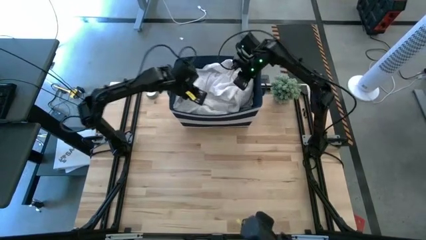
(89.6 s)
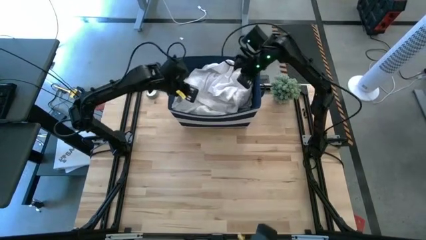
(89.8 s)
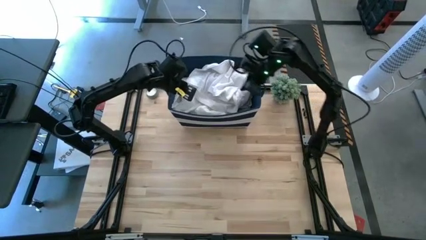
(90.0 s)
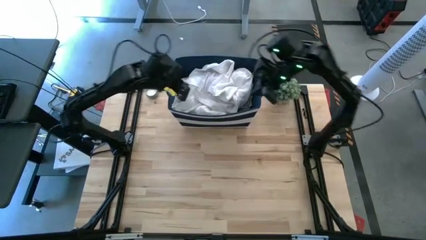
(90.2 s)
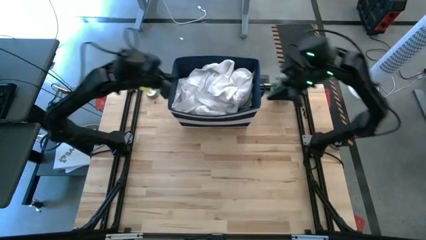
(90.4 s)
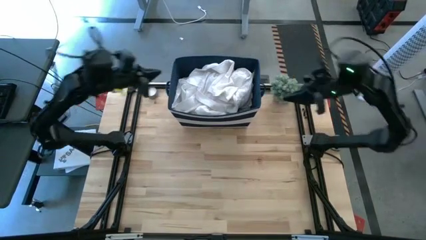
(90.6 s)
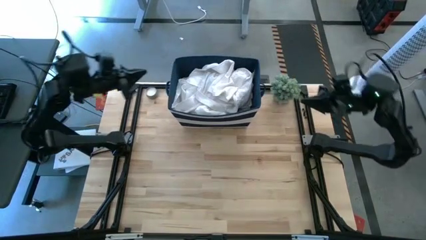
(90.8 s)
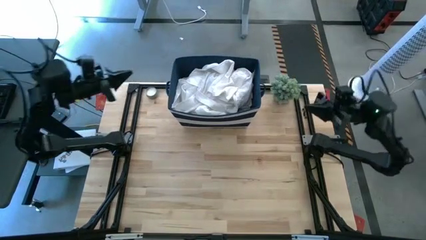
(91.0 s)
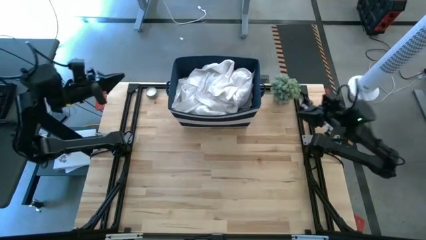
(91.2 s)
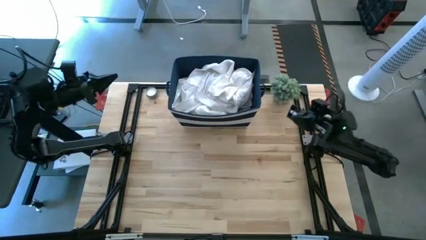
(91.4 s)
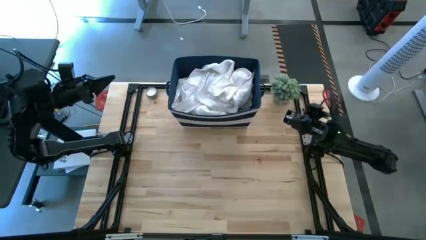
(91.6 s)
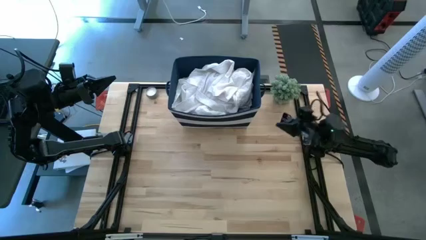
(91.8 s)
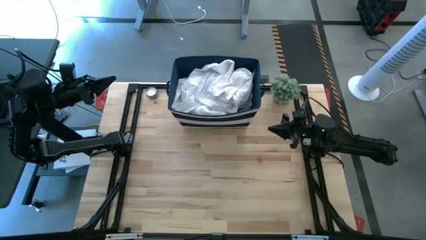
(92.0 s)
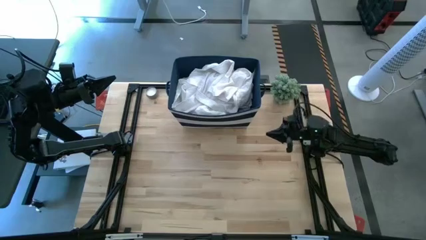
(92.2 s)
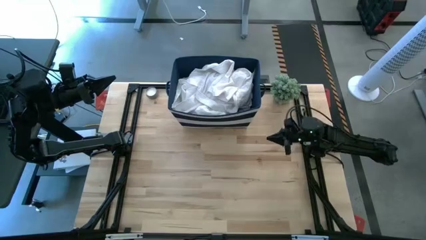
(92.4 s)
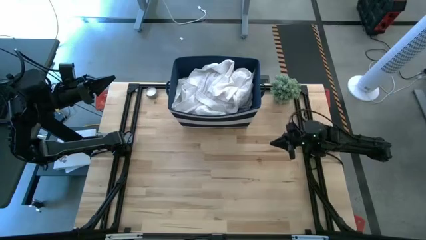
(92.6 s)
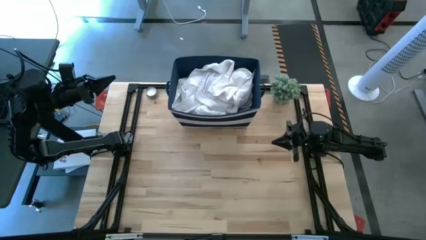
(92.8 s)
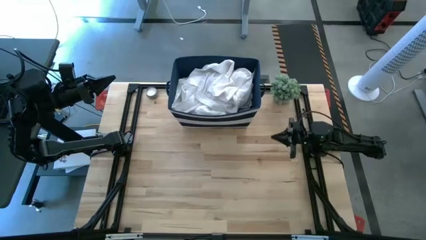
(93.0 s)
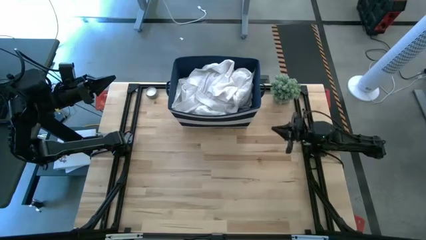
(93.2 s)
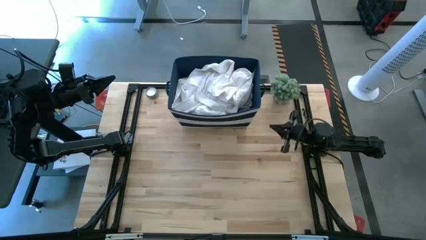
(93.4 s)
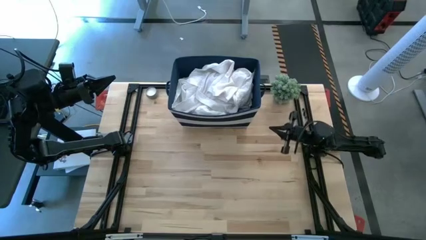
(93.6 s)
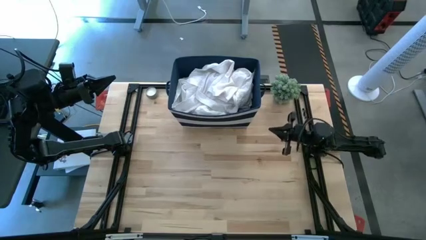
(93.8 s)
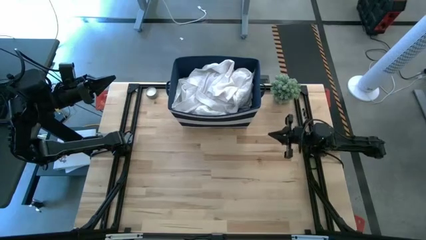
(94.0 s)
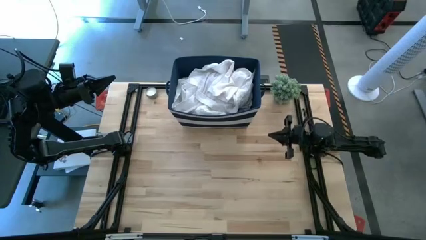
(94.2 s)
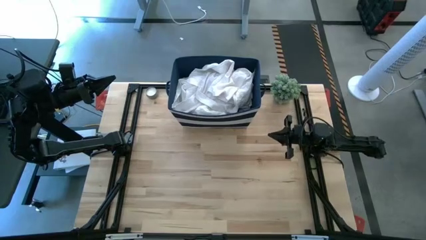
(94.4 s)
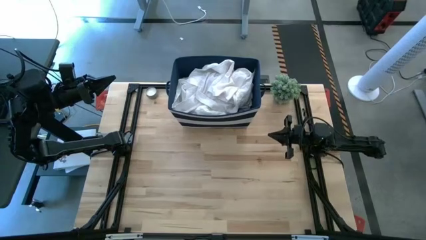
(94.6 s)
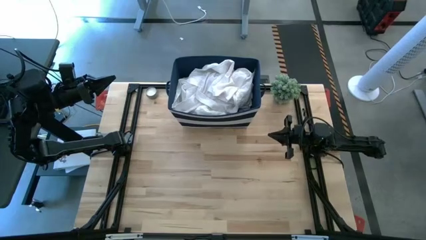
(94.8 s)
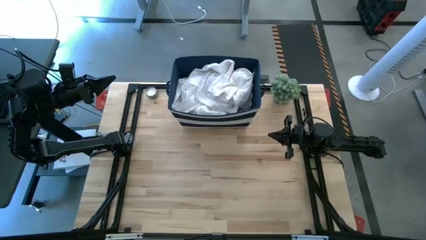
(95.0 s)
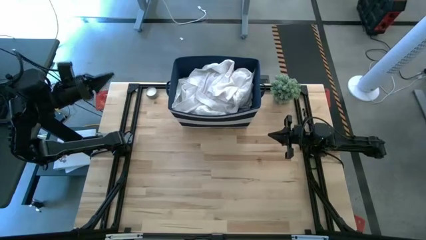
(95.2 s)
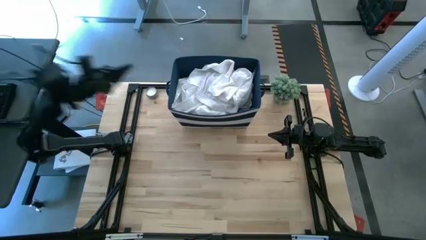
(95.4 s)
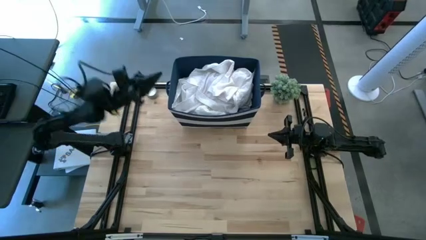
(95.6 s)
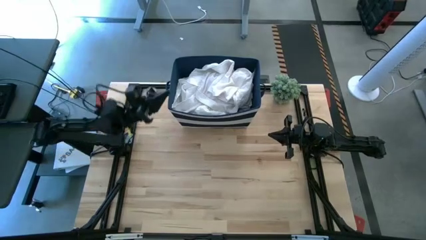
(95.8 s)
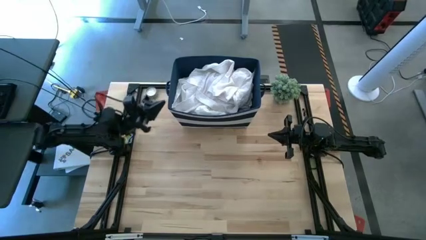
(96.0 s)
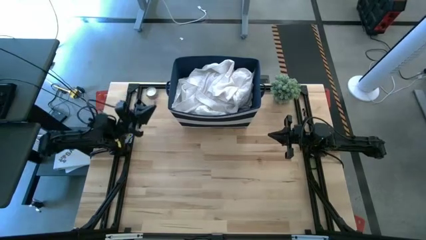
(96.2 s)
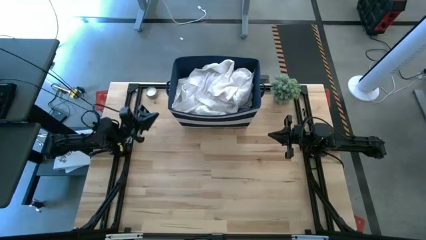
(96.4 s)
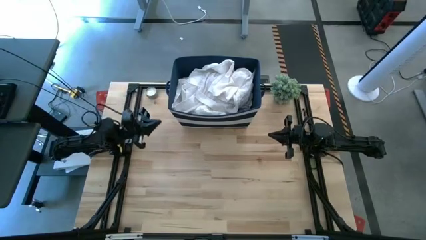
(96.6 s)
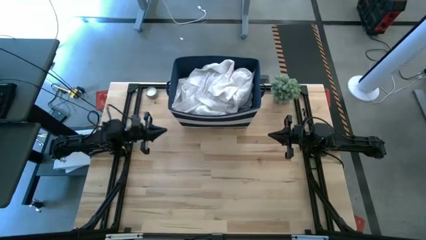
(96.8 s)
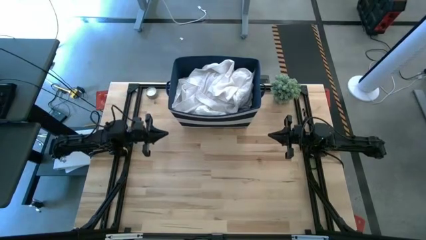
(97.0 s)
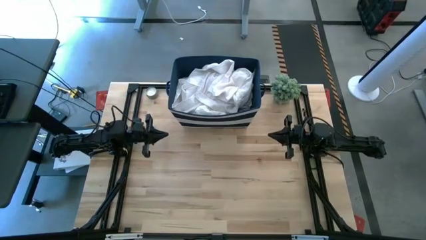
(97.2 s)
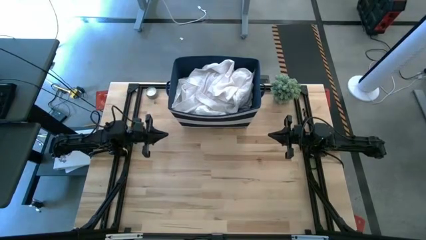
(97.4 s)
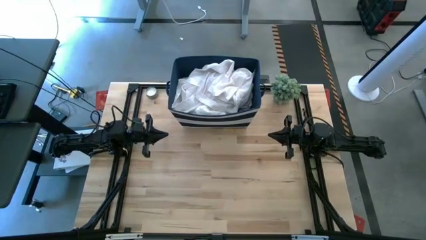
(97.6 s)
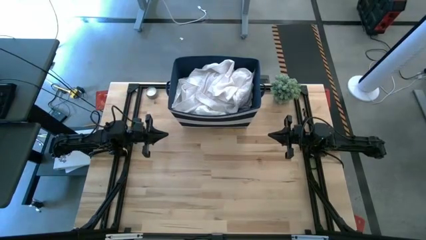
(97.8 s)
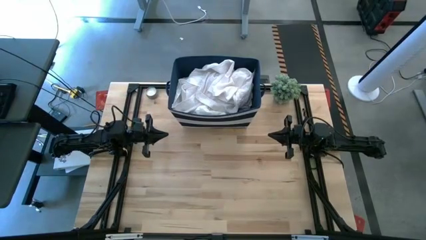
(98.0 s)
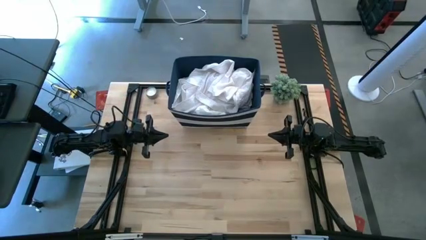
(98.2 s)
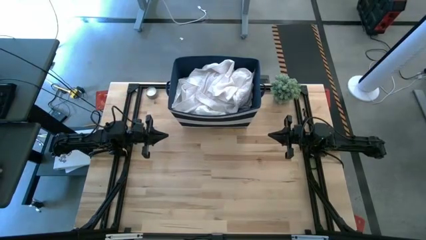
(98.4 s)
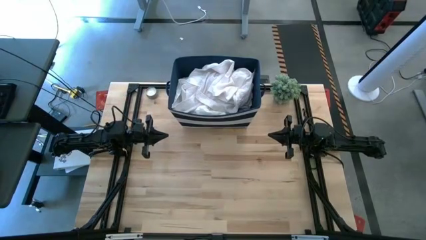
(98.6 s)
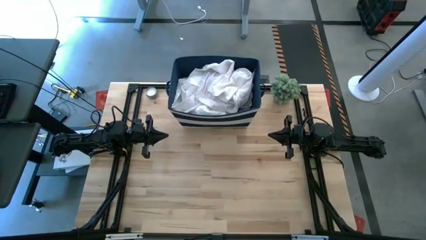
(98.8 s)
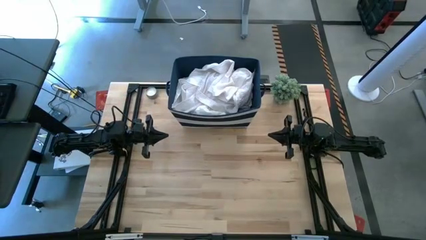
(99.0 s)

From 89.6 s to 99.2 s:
Task: Sort clothes
Return to Home Position

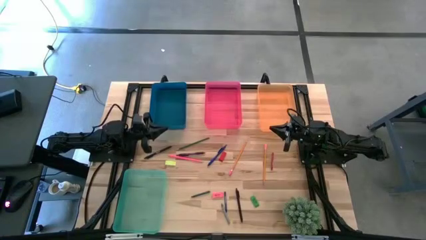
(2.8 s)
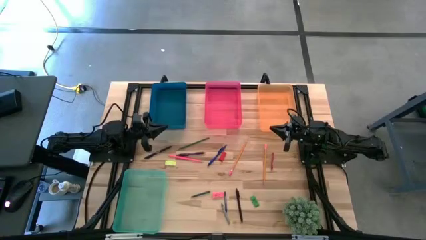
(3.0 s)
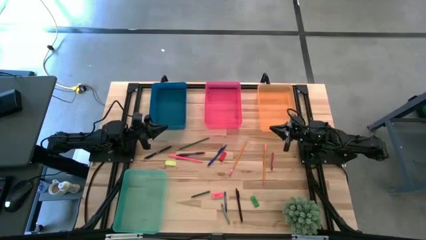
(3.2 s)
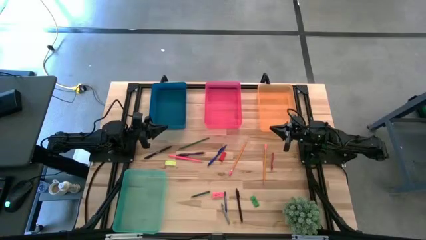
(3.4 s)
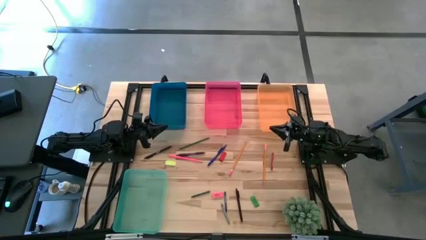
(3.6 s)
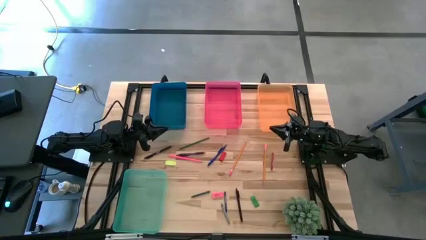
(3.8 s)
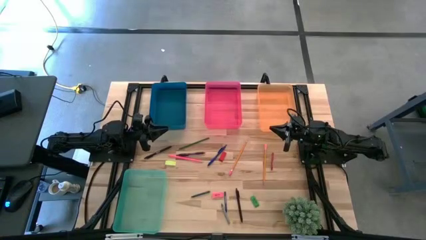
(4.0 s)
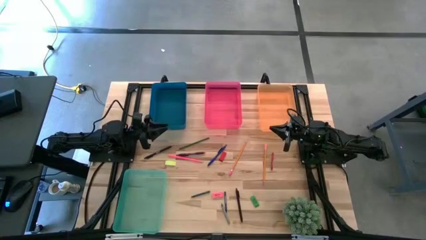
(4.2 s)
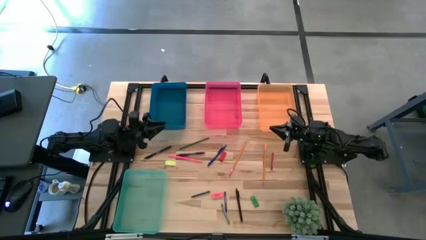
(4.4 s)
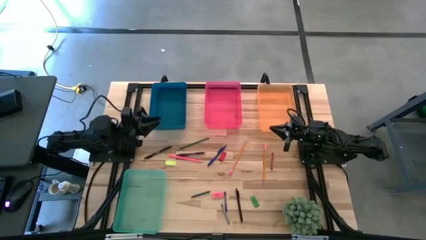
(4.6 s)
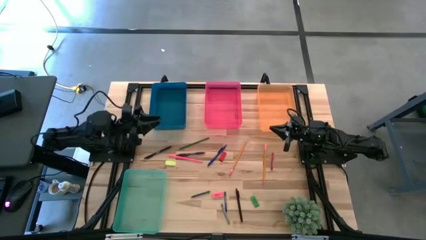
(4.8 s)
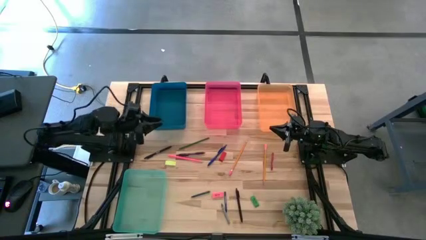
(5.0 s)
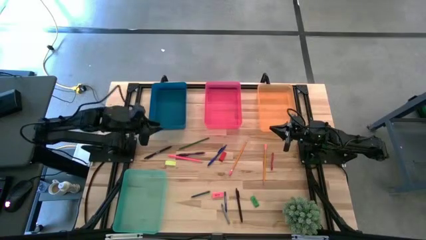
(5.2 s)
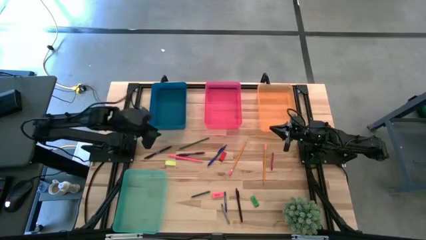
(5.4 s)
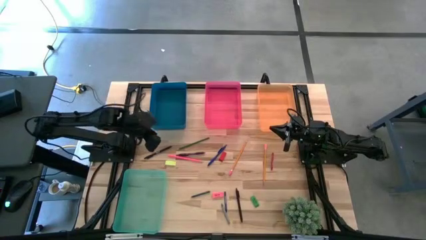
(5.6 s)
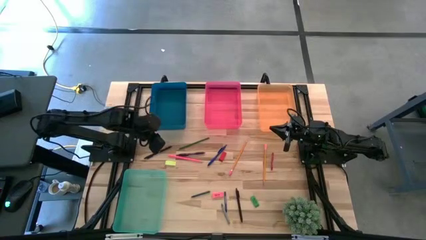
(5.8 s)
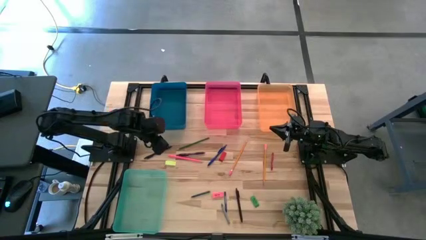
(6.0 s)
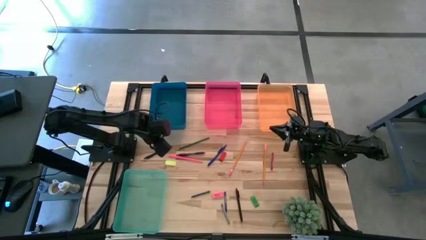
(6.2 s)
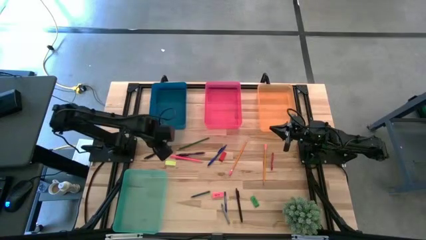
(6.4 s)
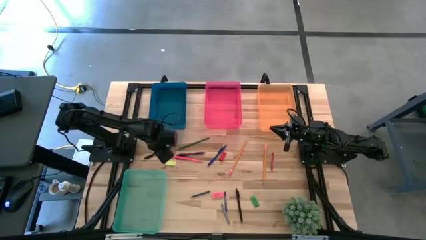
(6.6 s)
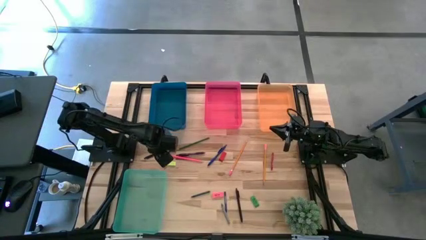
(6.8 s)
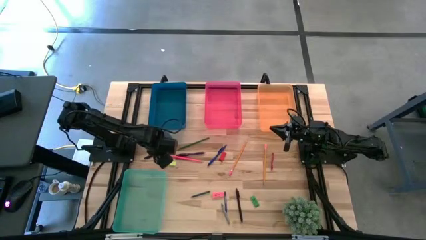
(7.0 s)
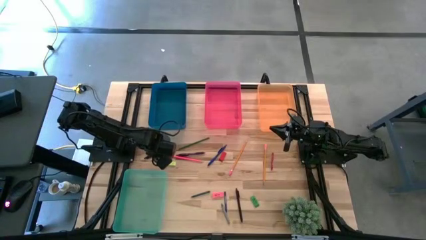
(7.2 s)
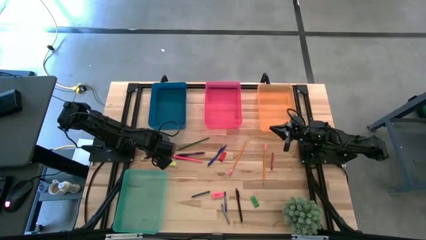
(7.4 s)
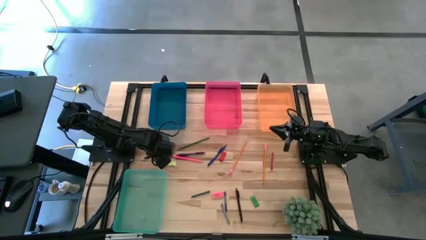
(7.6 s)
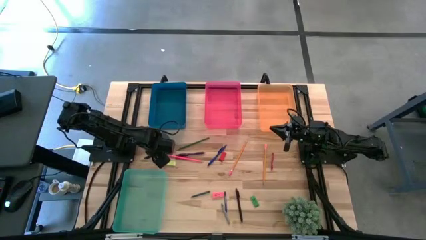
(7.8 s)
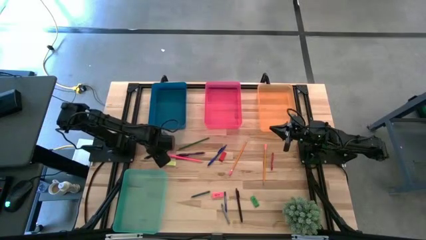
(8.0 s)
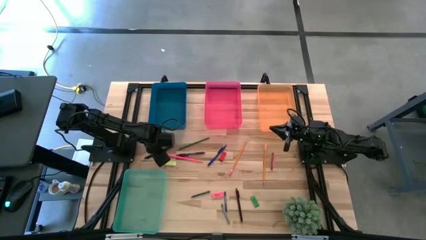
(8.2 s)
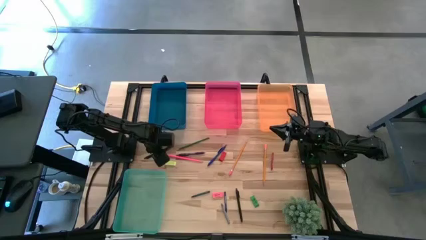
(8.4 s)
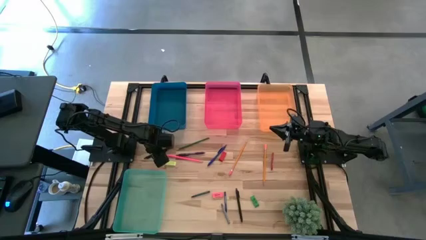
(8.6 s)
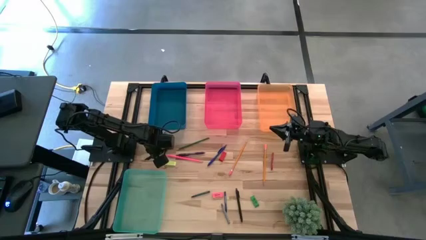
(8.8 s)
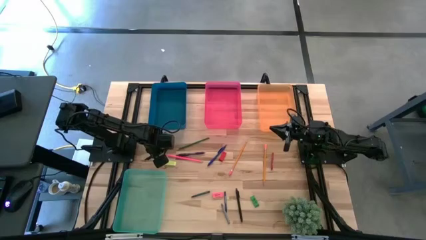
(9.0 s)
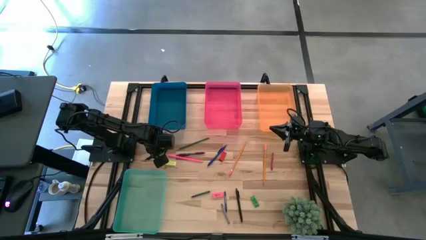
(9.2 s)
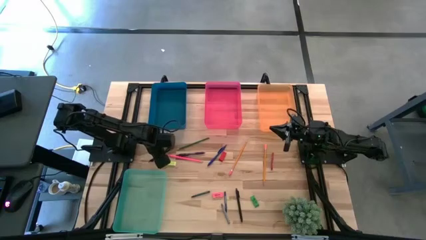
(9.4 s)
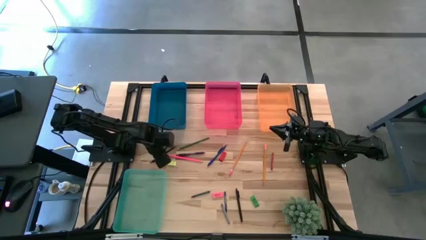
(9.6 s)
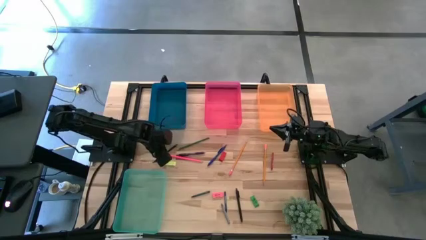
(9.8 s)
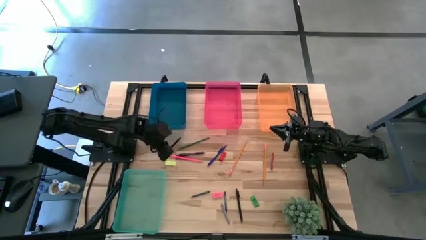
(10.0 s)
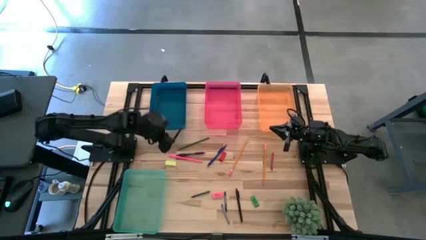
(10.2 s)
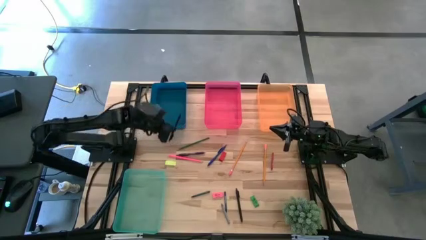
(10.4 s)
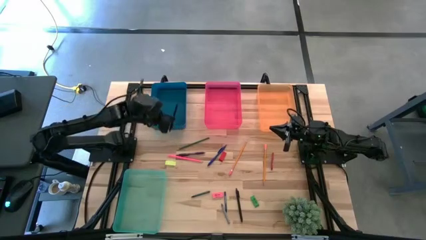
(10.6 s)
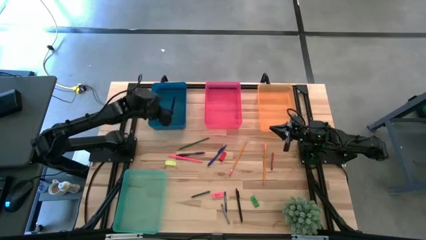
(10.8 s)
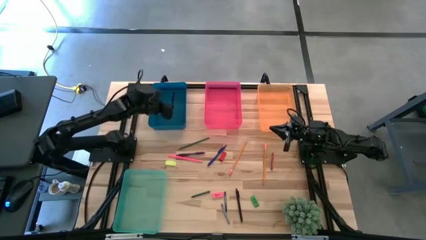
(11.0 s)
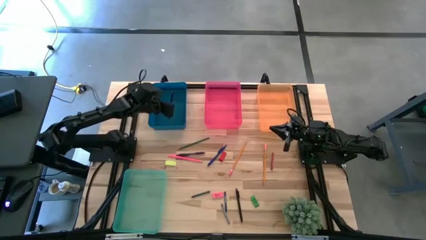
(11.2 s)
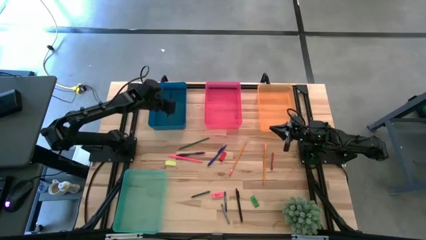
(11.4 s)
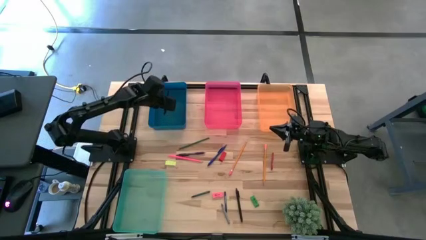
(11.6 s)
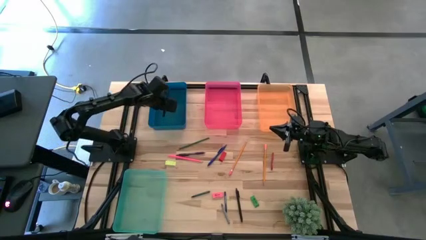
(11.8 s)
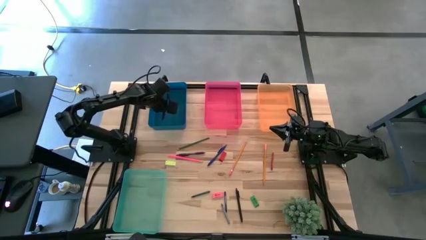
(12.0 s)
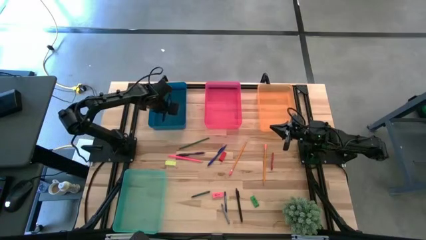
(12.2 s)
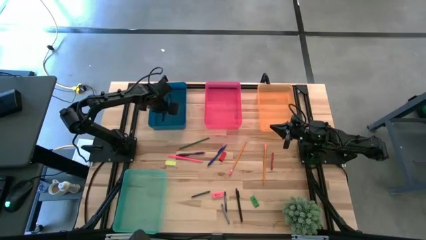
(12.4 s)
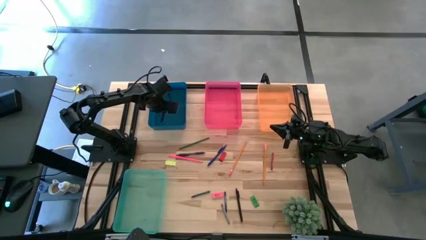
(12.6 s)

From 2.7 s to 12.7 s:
Task: Sort crayons/erasers/pens/pencils in bins
Put the top black pen into the blue bin
